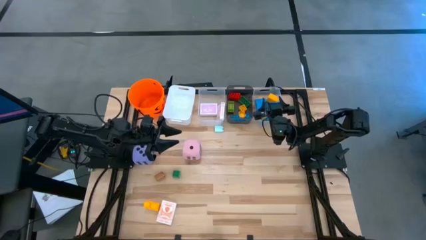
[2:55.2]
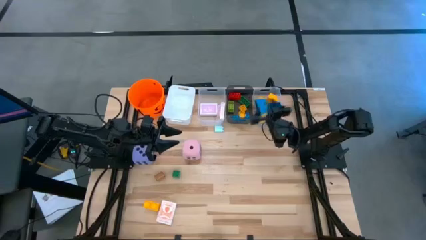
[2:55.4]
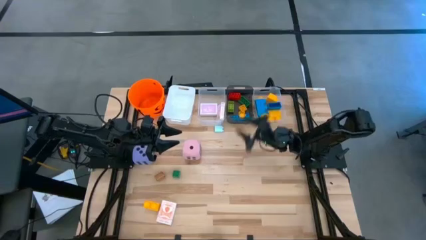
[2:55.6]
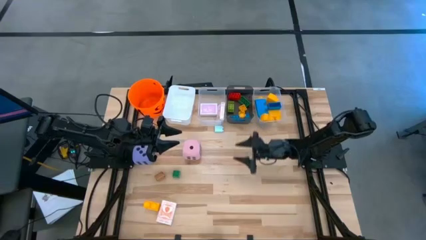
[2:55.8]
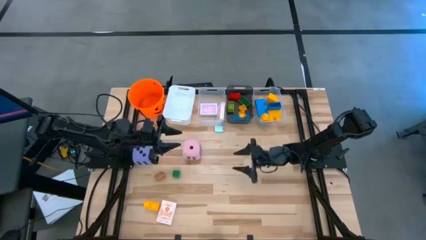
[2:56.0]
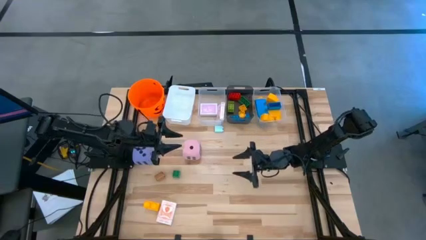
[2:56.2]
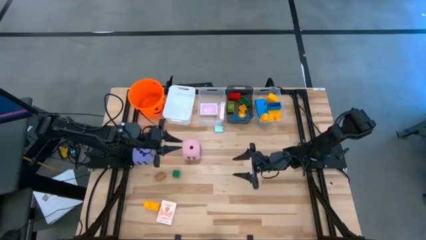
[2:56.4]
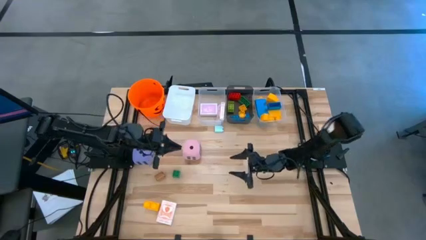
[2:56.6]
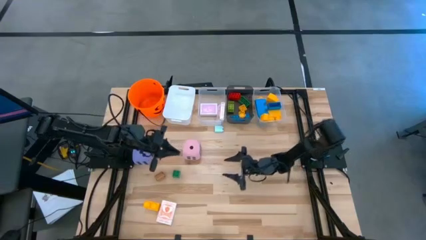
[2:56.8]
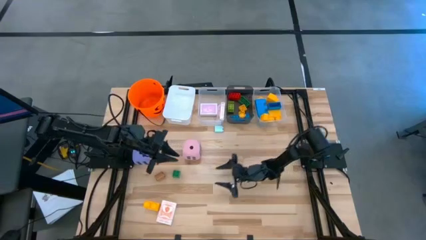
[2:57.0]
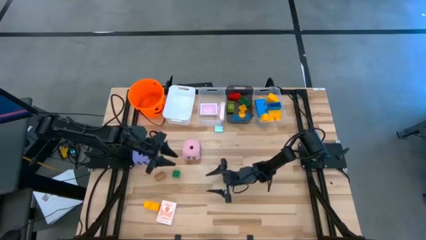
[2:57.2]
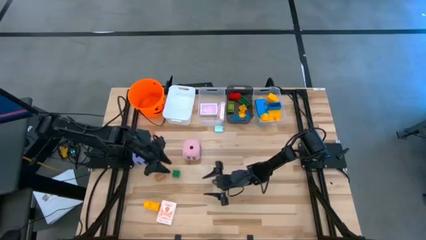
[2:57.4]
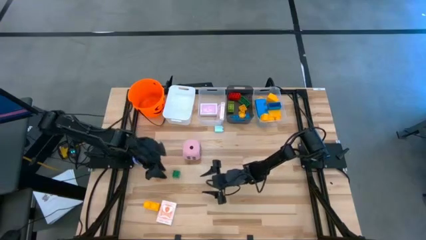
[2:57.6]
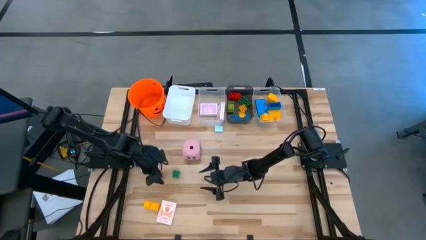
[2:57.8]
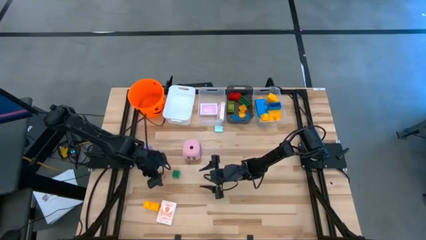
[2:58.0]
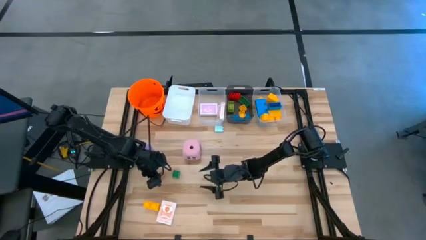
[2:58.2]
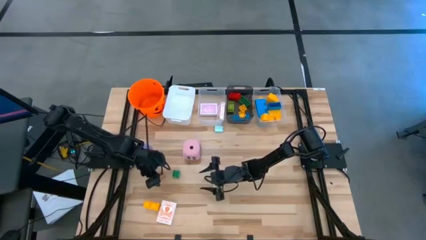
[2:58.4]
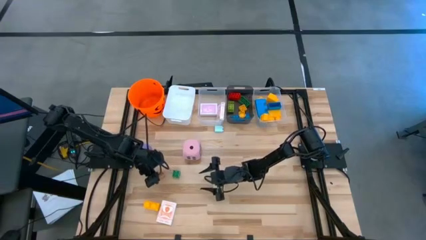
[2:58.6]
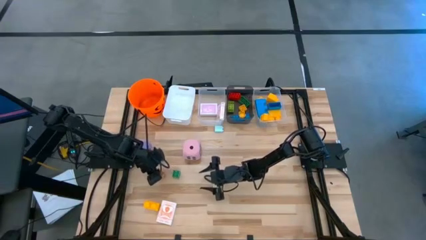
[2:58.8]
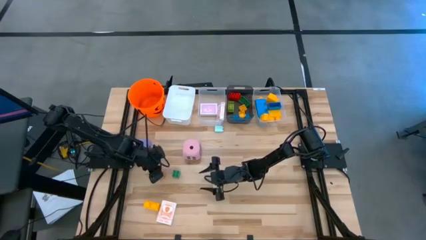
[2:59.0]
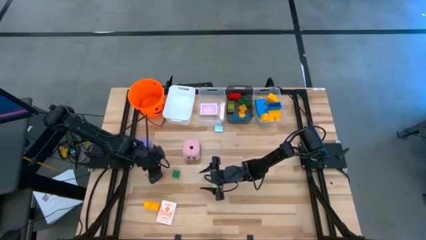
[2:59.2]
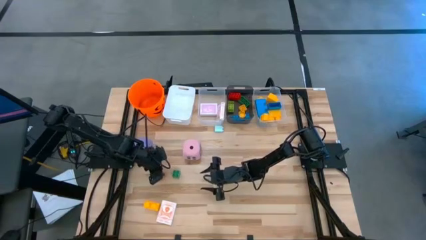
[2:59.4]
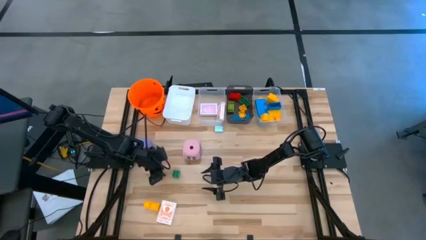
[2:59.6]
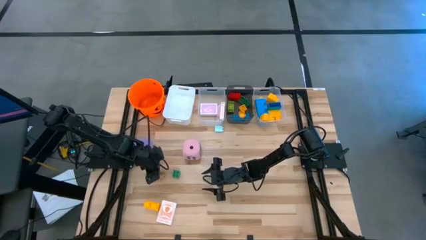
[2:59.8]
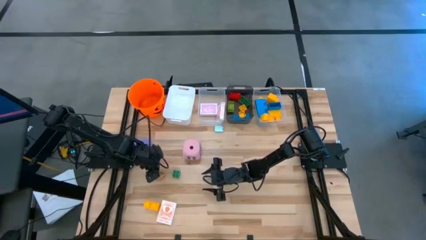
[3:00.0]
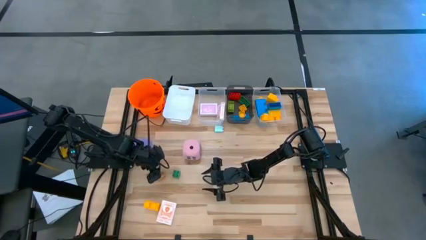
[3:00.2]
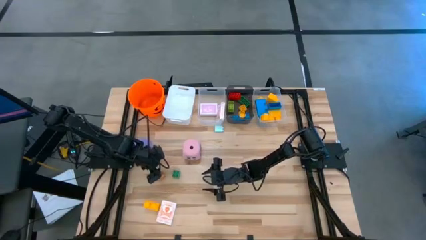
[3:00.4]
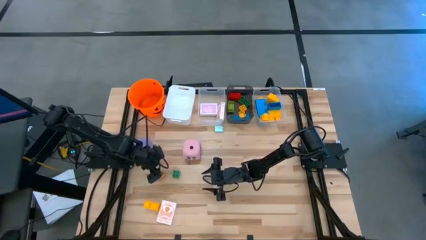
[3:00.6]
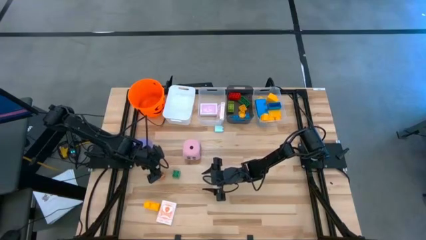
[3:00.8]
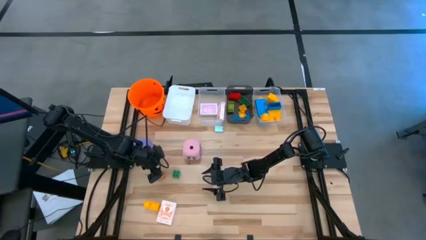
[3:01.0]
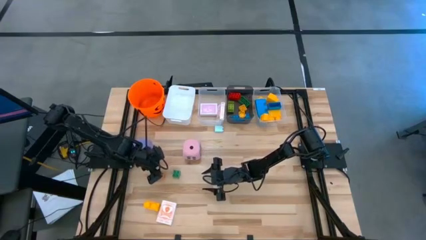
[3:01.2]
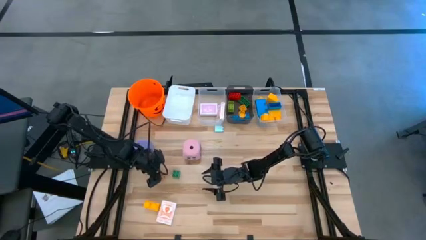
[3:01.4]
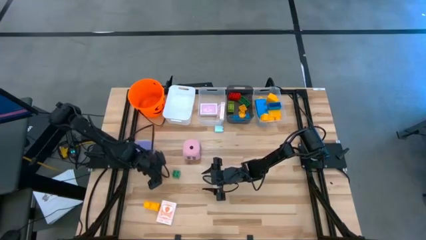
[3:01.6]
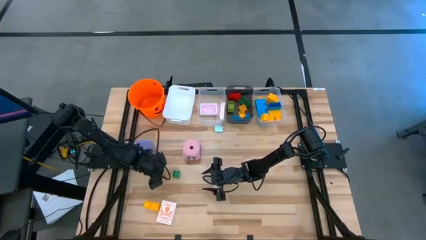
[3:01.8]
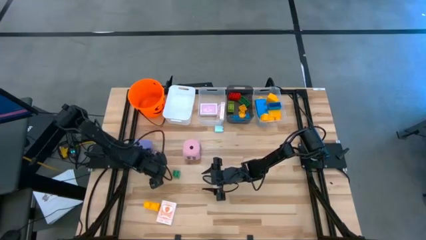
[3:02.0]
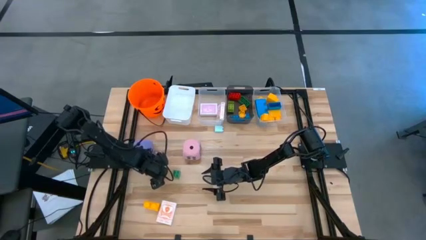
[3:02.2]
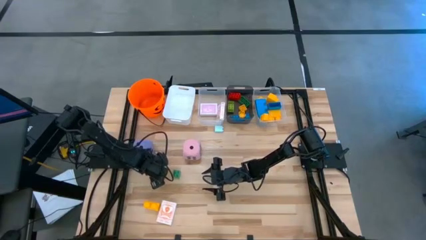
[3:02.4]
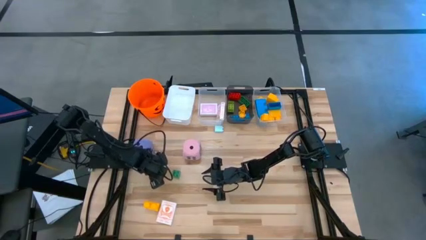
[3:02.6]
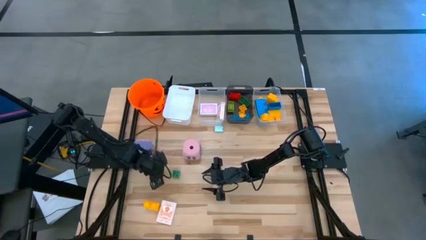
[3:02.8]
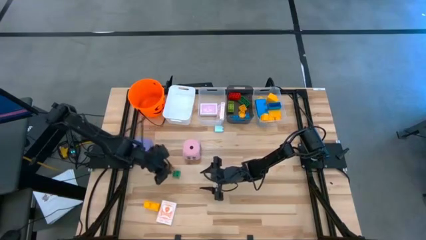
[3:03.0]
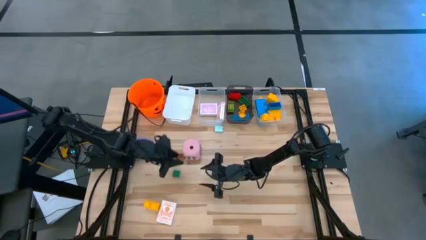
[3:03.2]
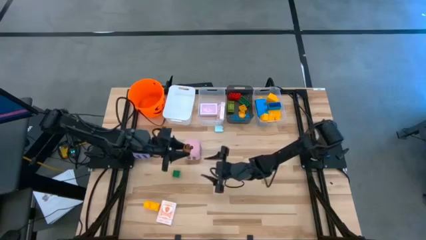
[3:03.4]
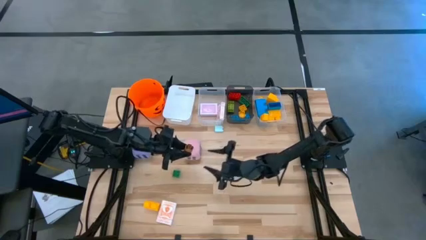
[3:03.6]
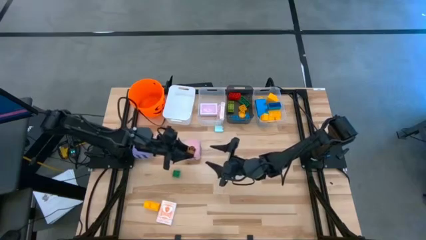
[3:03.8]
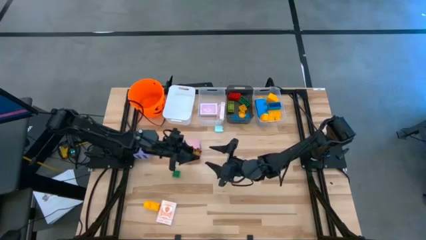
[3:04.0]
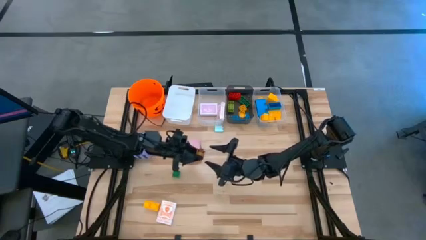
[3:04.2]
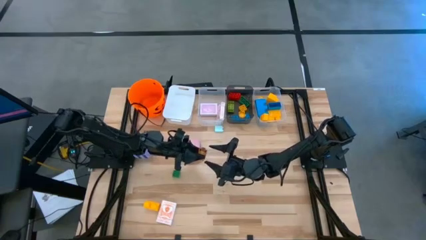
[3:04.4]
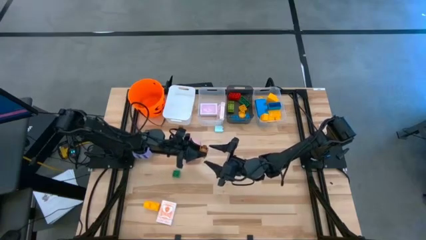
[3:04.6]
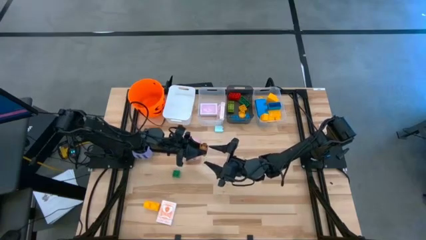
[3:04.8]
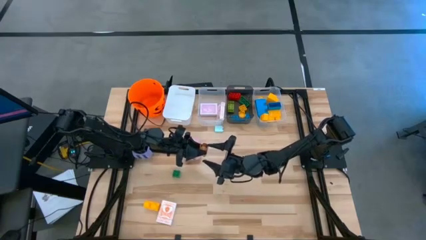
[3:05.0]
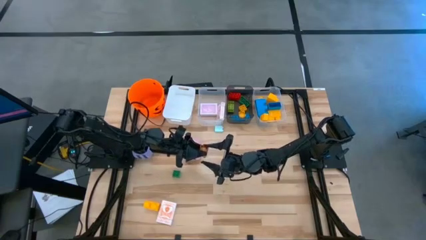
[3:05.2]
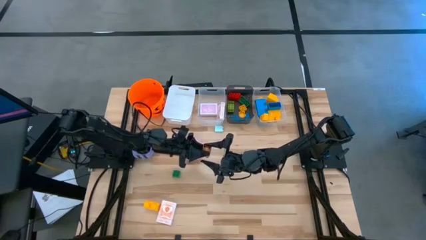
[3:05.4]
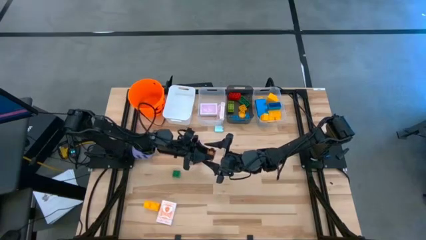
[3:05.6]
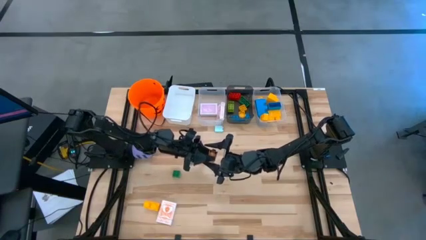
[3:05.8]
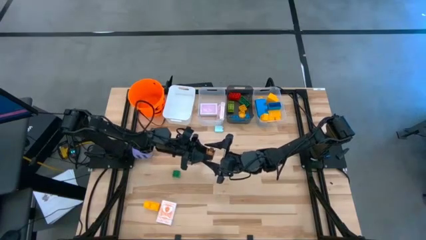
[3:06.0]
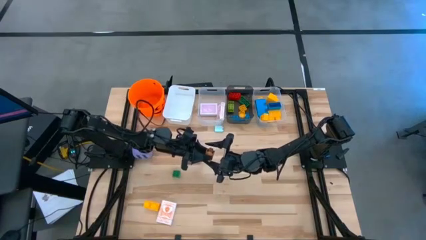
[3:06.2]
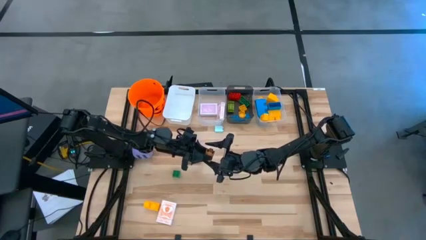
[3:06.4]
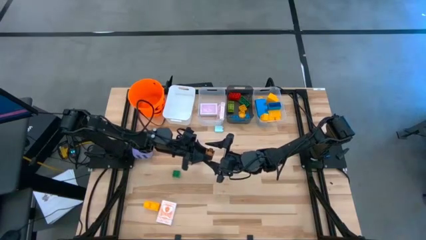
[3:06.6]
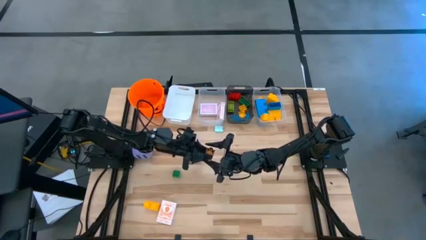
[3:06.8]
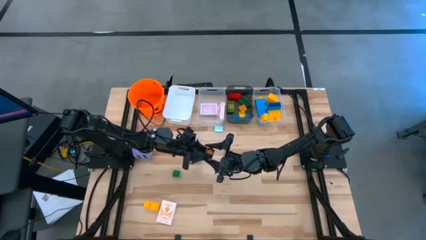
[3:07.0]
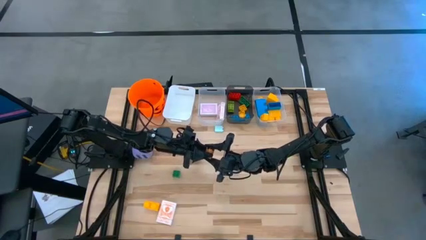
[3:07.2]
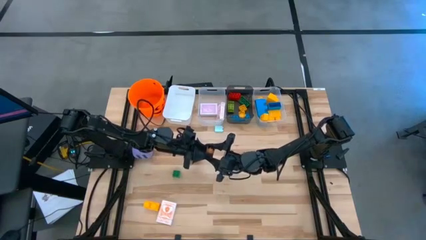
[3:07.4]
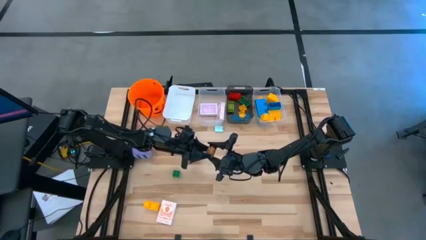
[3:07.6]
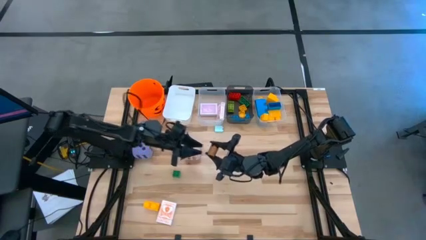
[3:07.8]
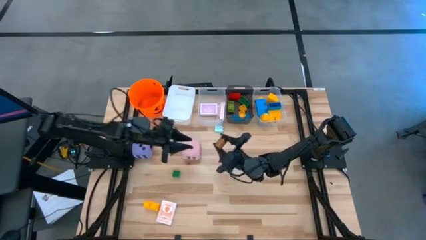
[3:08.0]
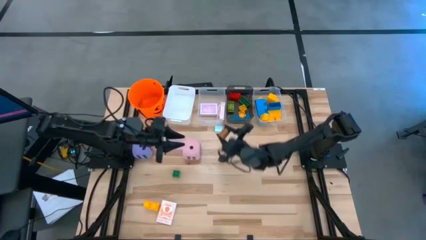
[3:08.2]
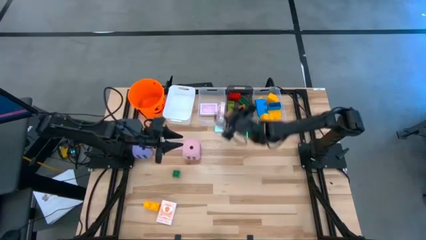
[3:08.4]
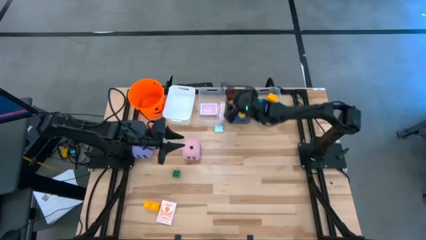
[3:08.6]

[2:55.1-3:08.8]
Task: Pick & Place Toys
Put the small brown game piece into the black bin
